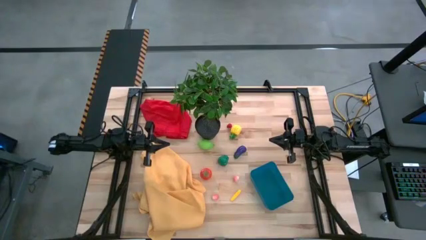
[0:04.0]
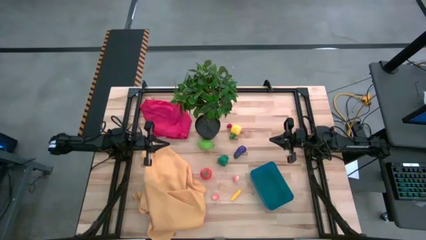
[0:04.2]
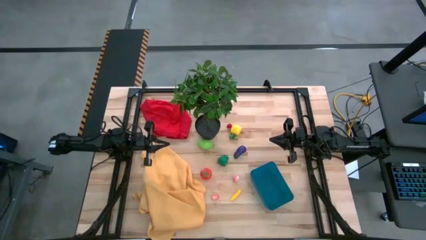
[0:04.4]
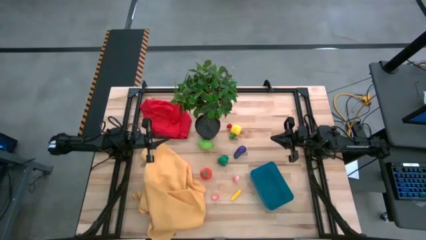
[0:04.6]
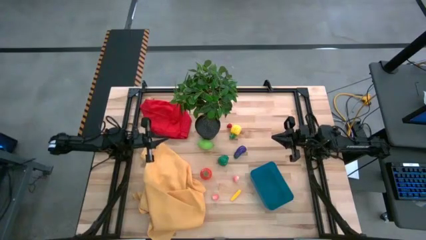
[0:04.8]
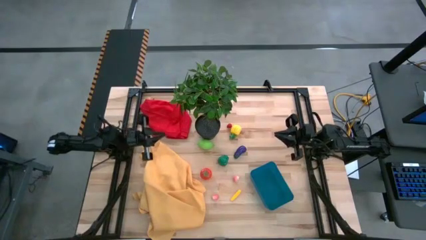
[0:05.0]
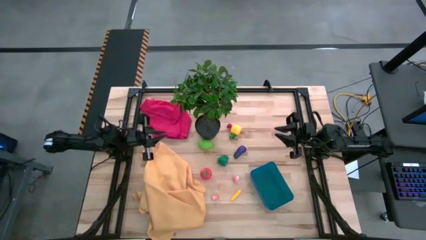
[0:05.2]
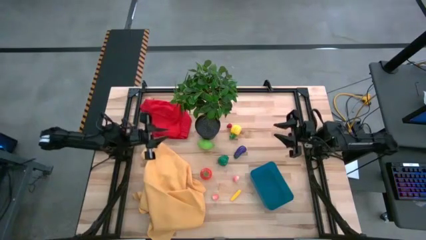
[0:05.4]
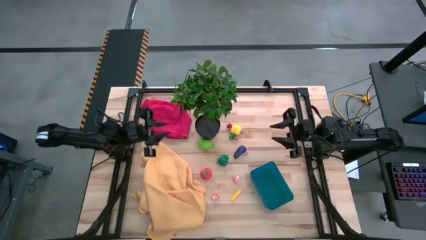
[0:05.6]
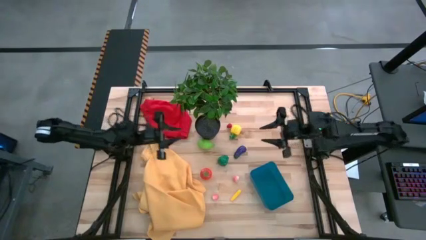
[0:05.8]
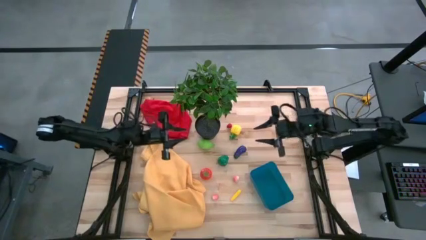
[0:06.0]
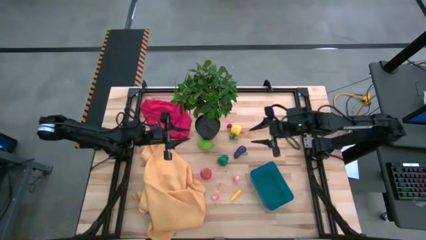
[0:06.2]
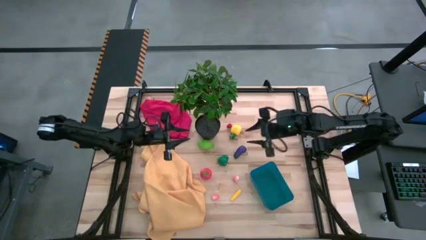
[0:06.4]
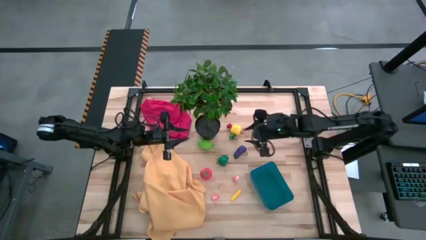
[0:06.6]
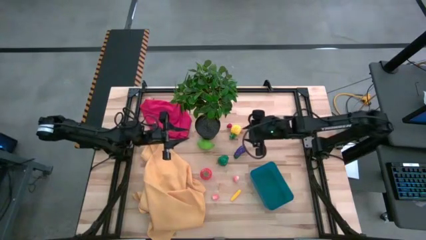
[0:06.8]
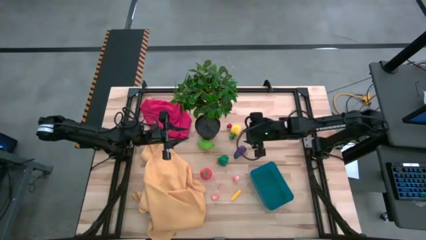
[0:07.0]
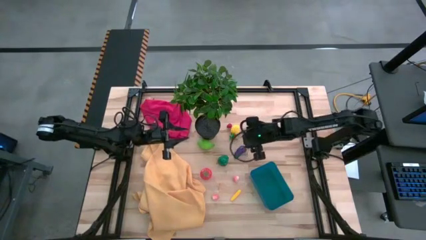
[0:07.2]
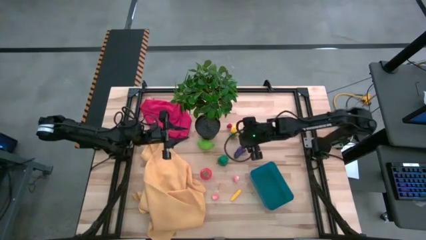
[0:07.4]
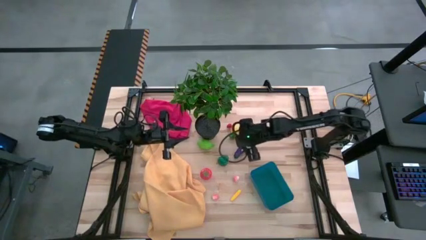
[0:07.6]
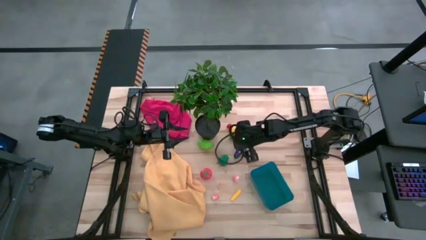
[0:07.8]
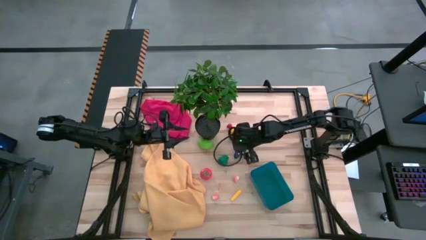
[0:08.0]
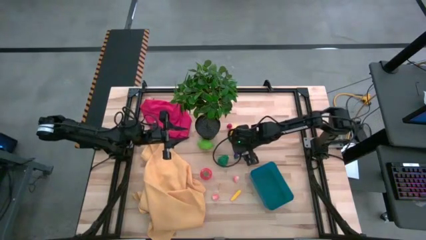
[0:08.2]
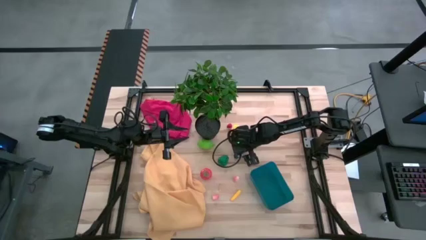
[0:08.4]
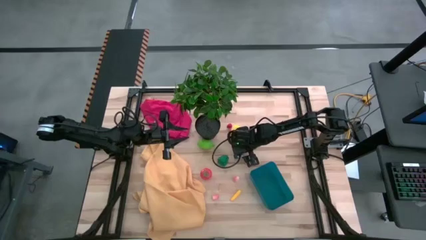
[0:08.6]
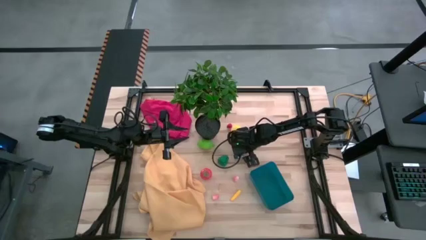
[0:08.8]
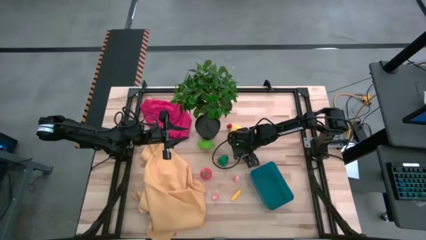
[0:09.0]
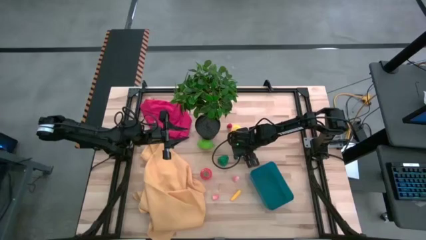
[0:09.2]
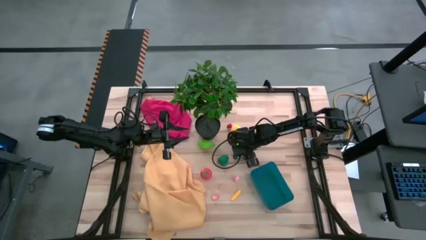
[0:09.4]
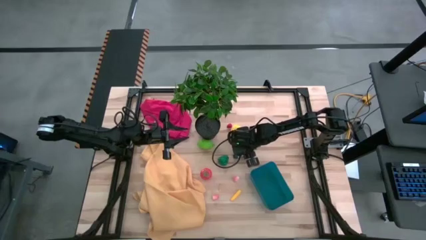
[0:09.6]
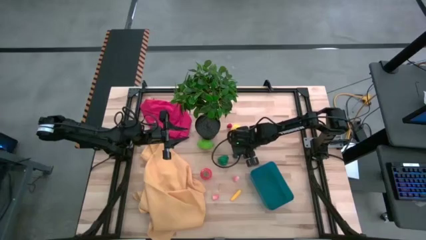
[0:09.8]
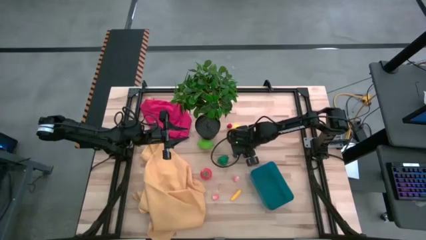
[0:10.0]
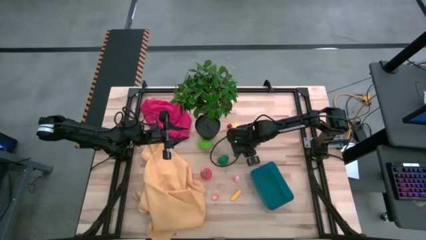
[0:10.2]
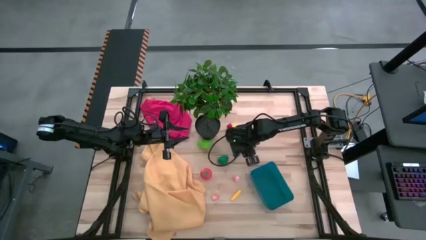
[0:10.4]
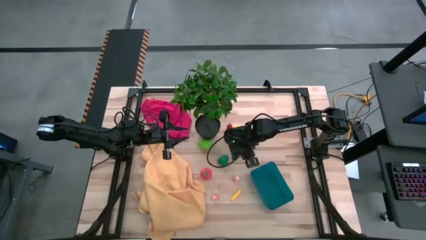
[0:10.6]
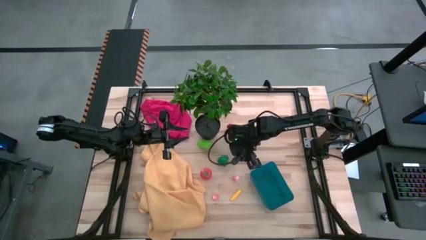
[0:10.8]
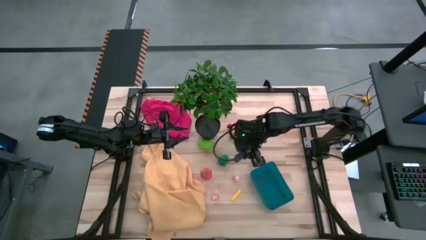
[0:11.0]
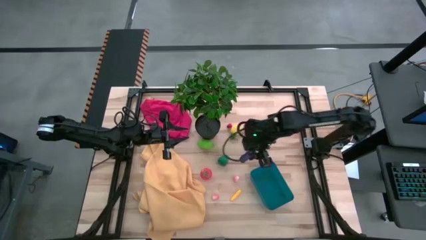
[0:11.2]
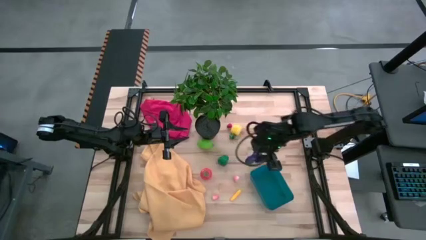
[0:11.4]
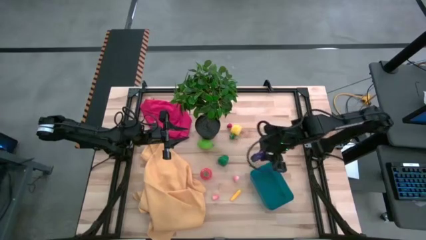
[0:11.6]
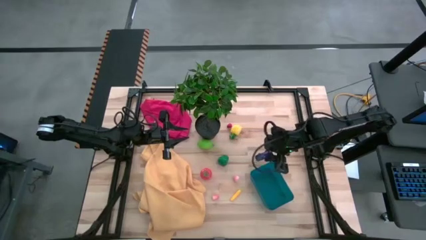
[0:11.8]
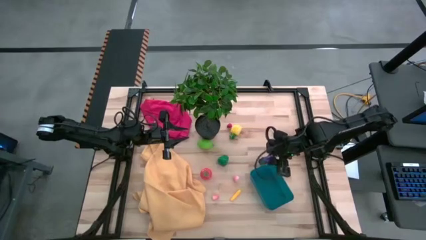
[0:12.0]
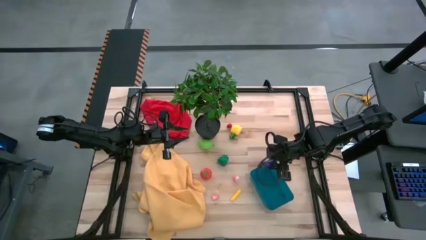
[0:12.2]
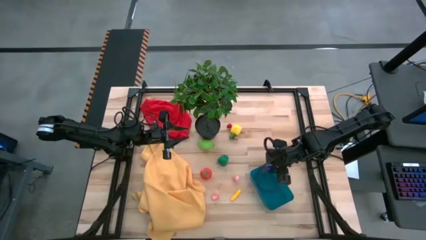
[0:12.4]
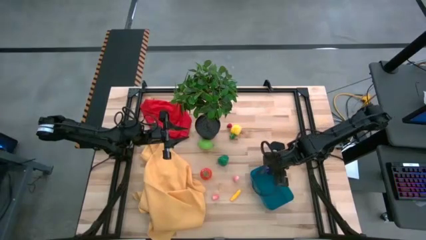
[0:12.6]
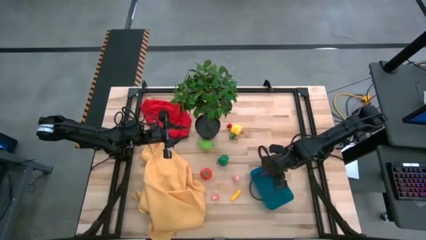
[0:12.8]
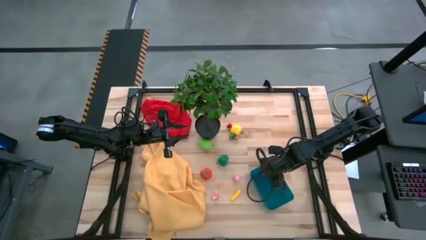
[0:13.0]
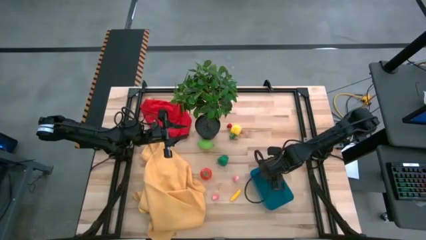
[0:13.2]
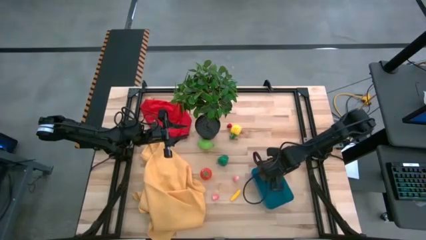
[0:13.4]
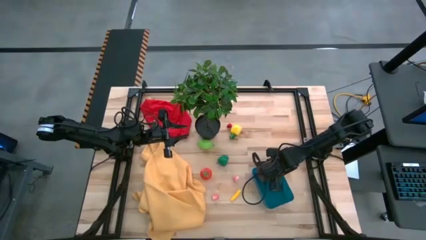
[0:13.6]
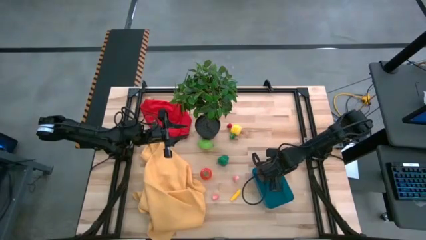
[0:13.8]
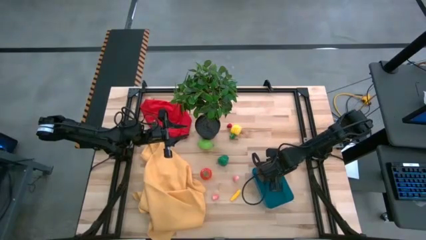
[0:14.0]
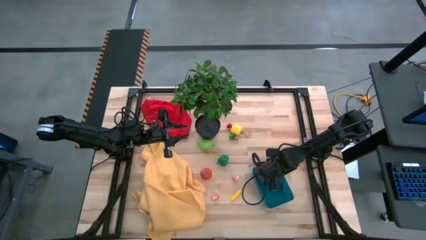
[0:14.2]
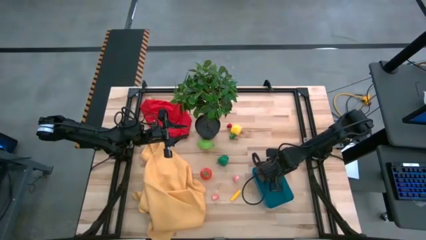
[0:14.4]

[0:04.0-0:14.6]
Task: Pick and placing Produce into tupperware
Put the eggplant into the bin
